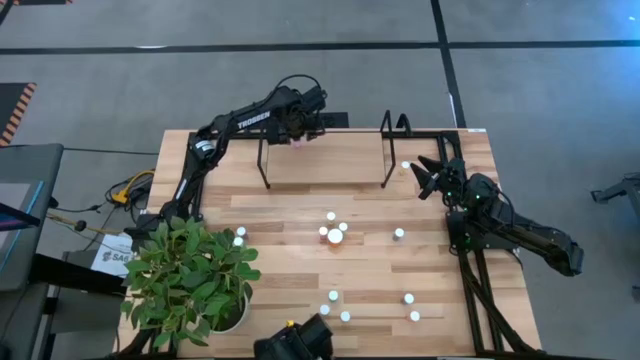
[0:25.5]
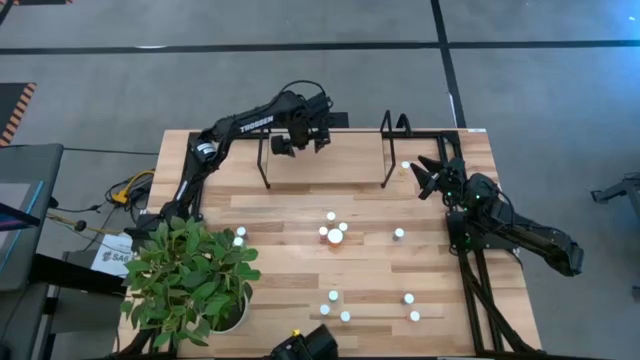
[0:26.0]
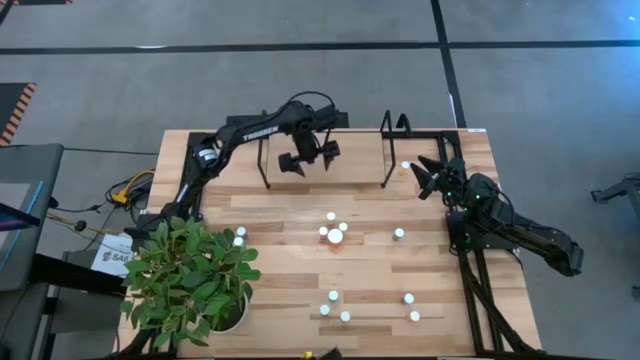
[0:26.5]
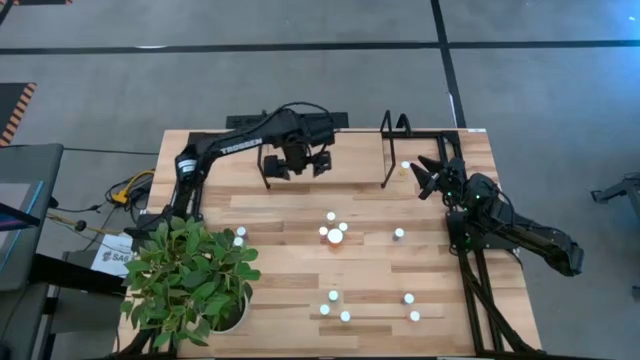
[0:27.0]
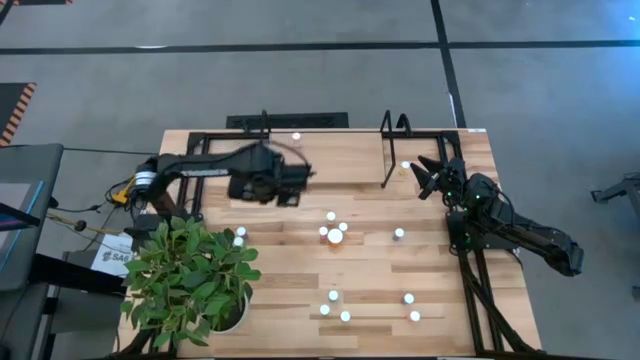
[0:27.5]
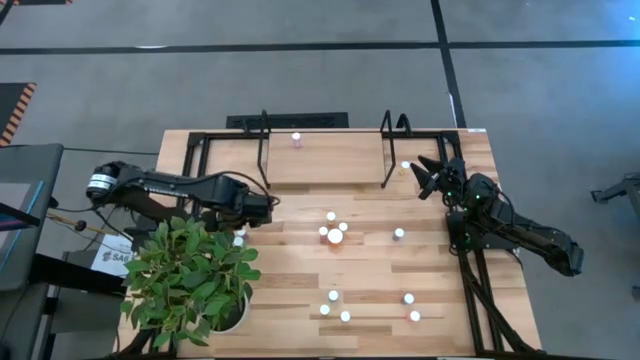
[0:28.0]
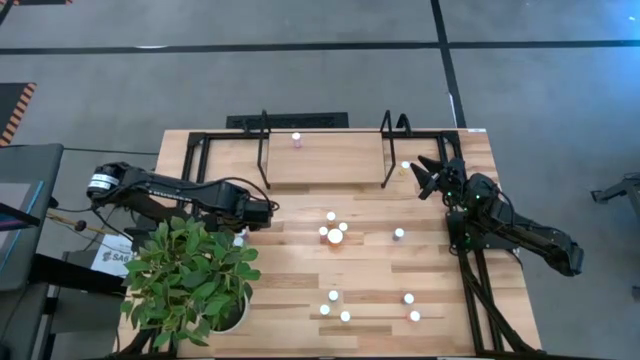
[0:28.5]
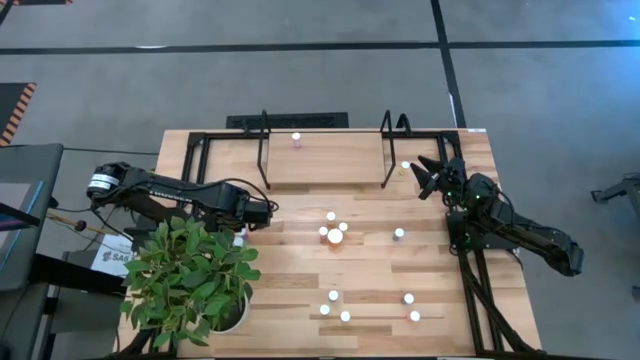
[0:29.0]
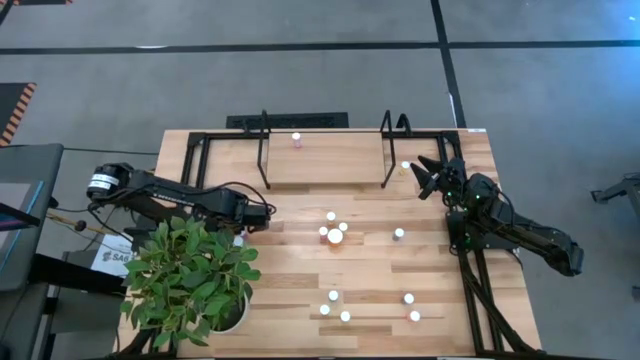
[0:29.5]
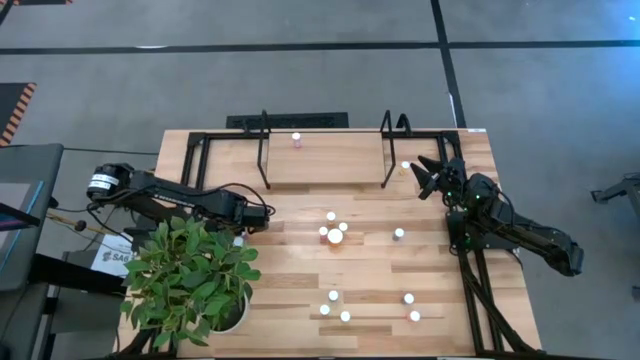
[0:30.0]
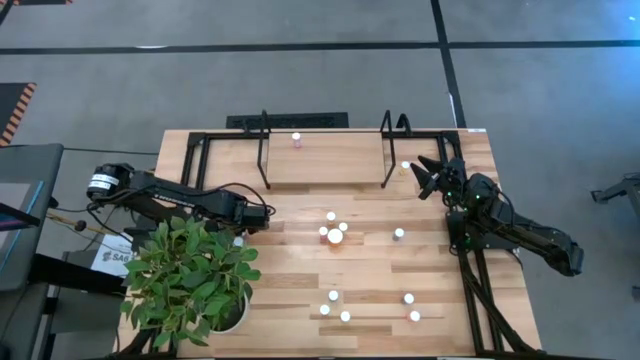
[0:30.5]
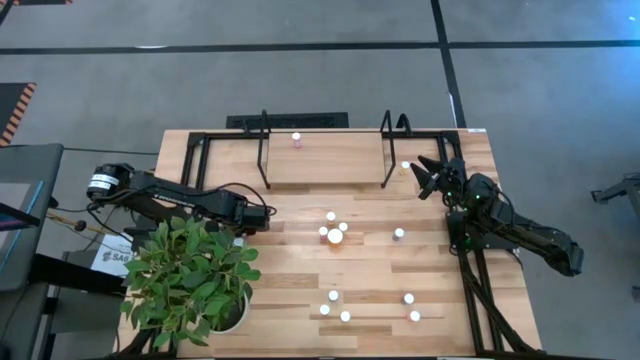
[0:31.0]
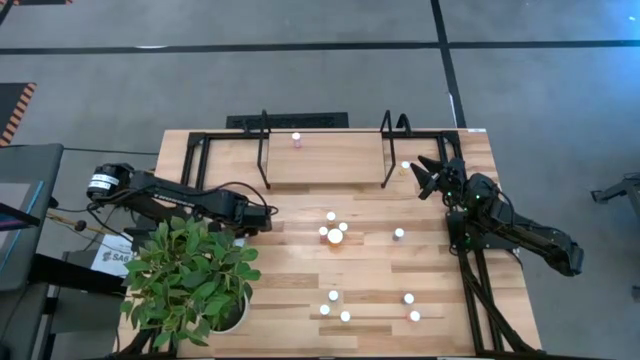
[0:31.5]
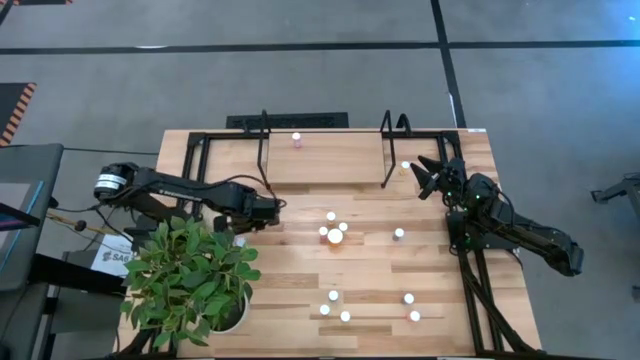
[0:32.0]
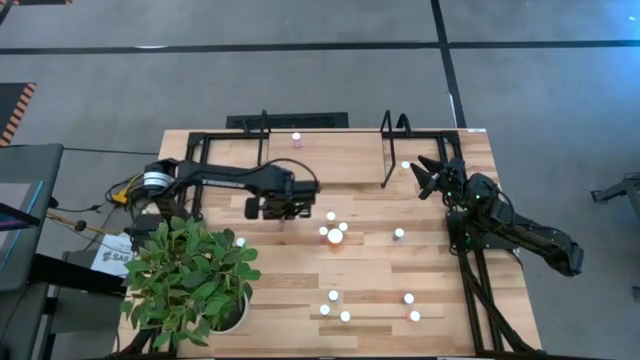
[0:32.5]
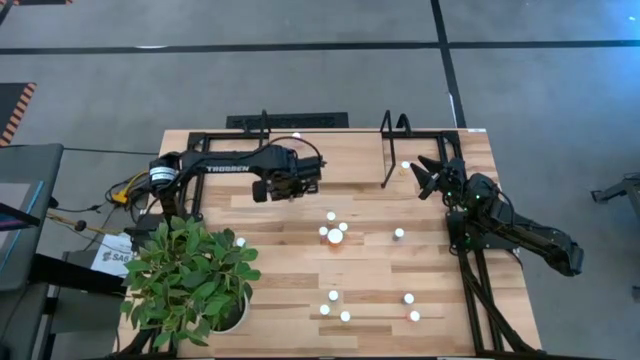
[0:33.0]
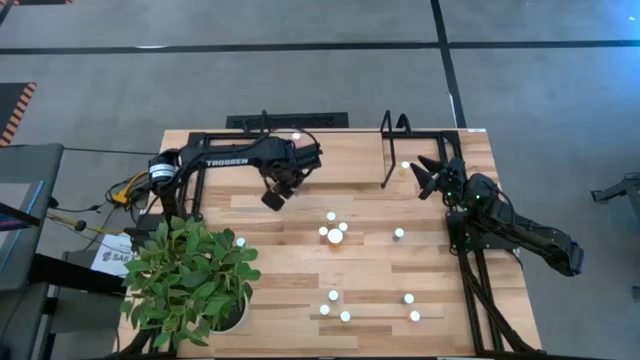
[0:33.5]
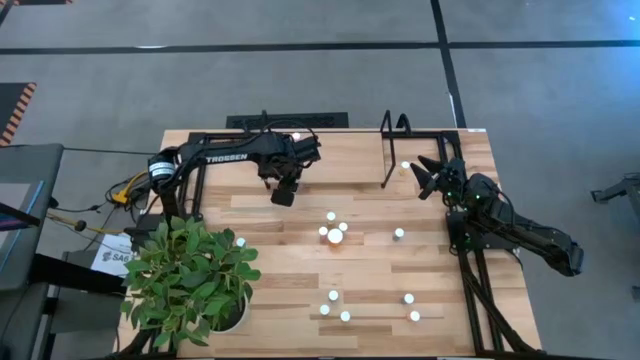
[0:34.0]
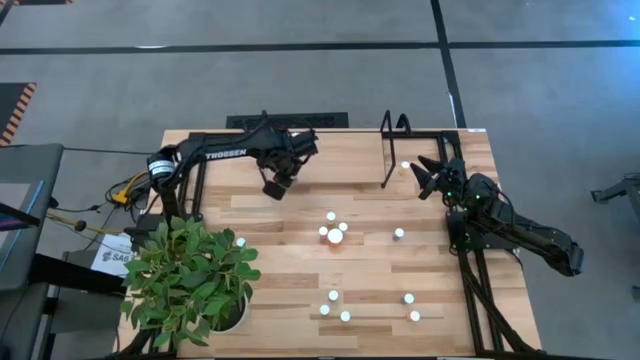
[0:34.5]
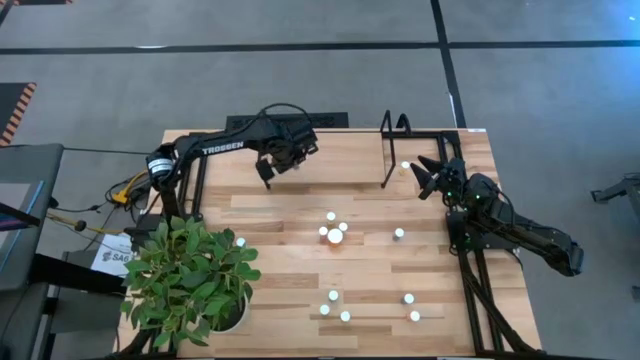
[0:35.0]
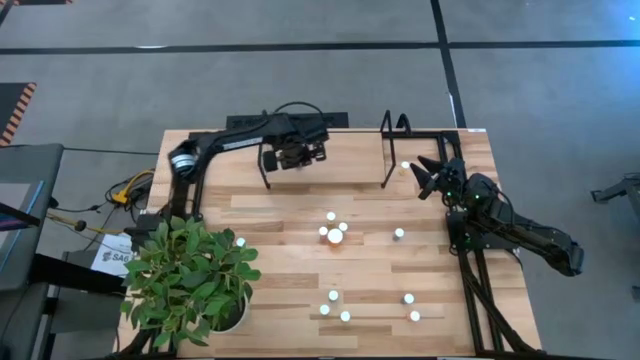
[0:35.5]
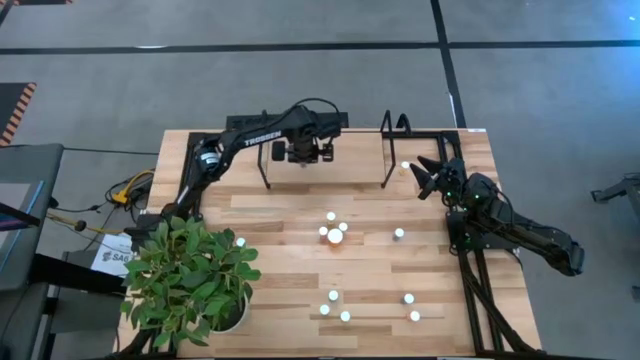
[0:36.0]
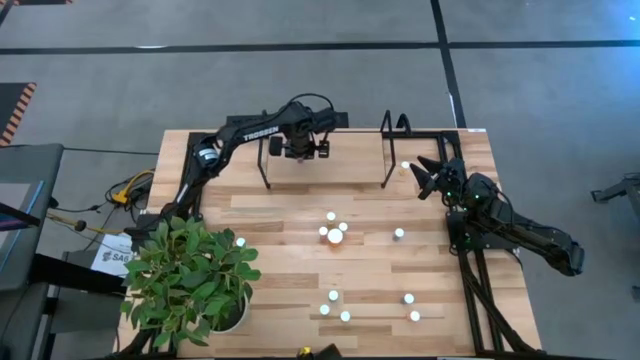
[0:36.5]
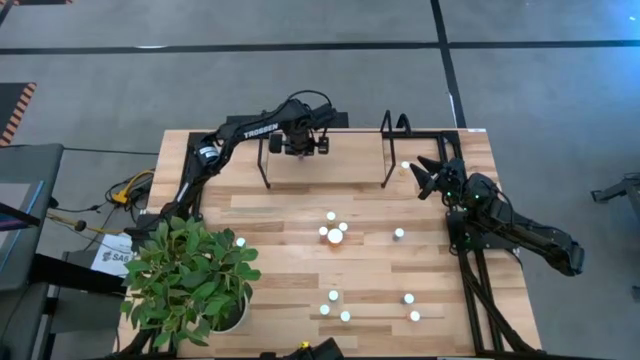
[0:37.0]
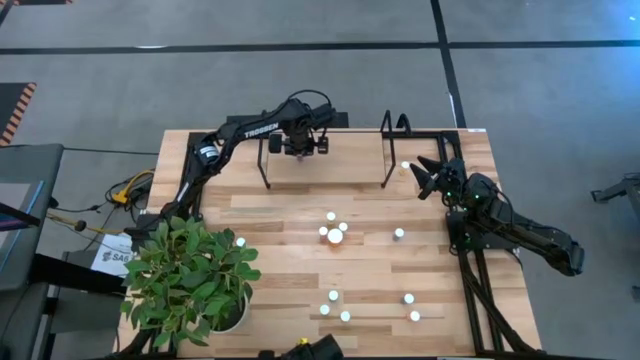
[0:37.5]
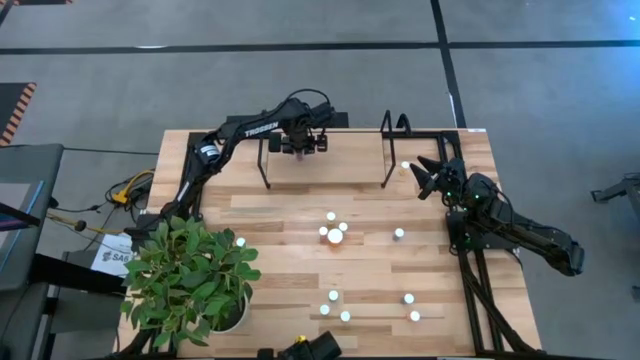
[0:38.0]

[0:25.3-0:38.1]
Task: Pick and place medicine bottles onto shelf by color
Put the blue pill bottle on the shelf

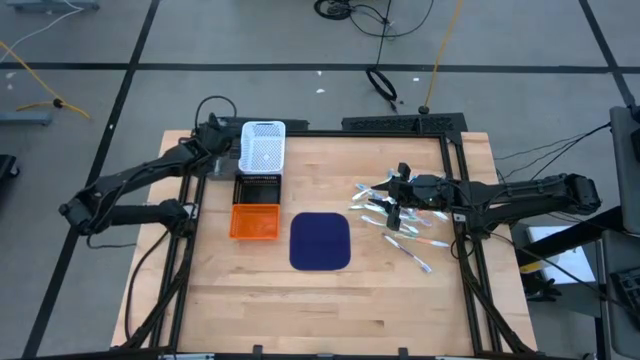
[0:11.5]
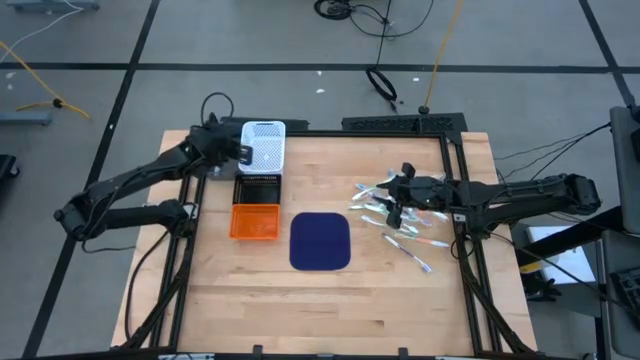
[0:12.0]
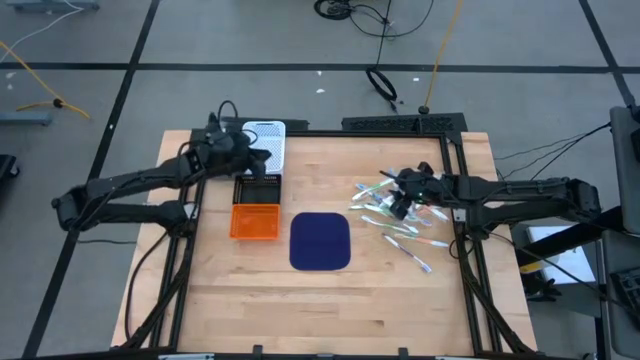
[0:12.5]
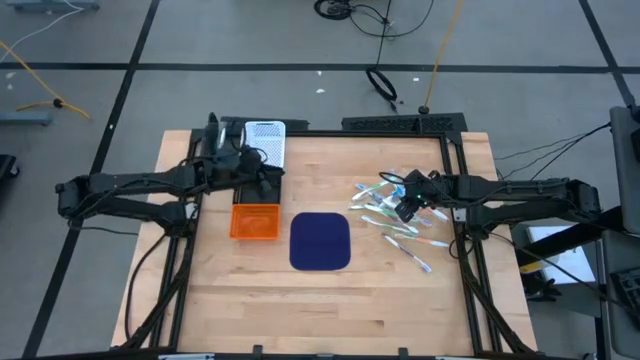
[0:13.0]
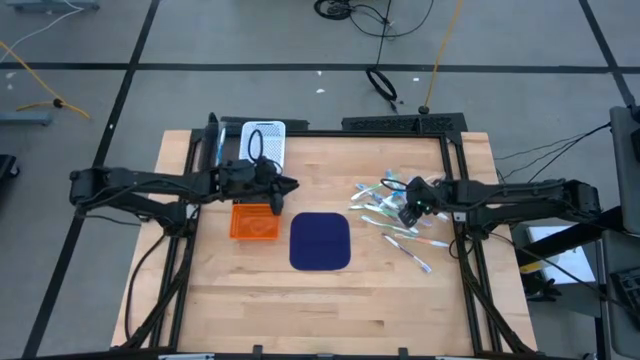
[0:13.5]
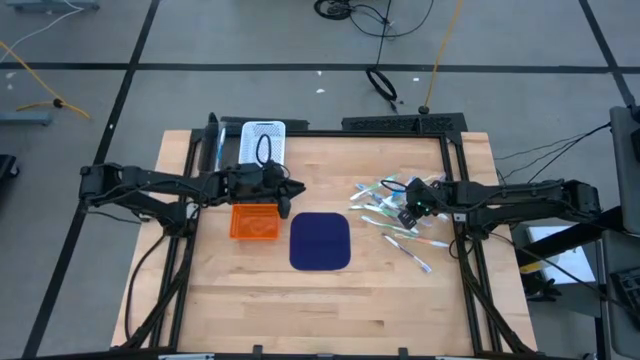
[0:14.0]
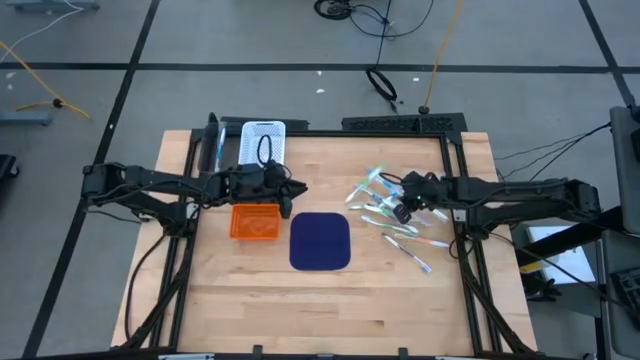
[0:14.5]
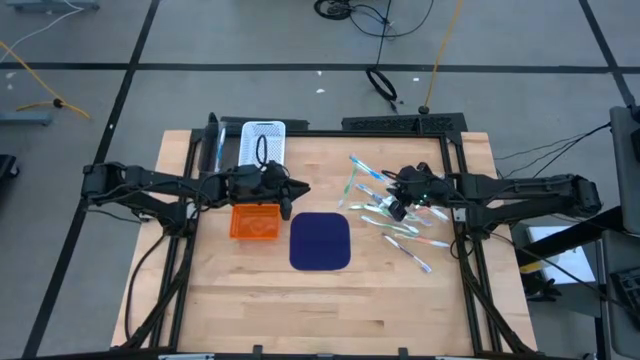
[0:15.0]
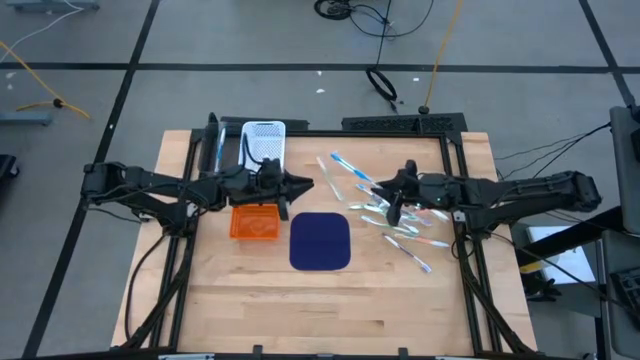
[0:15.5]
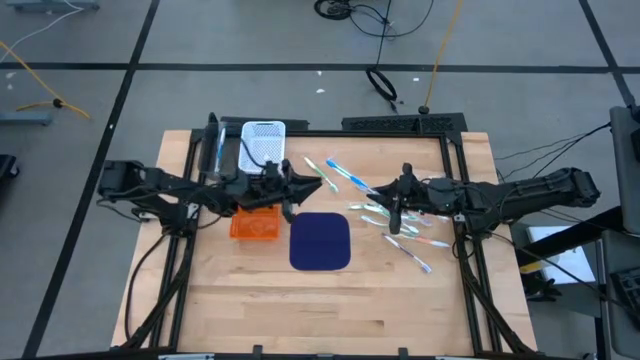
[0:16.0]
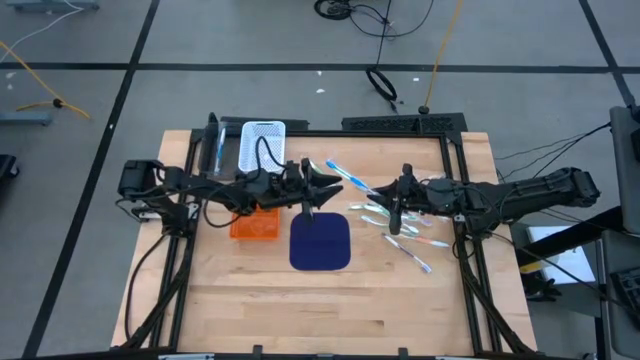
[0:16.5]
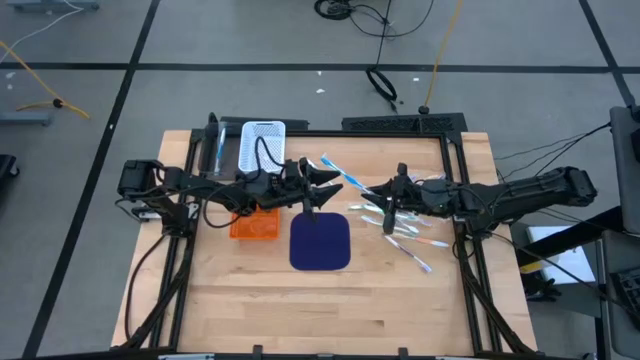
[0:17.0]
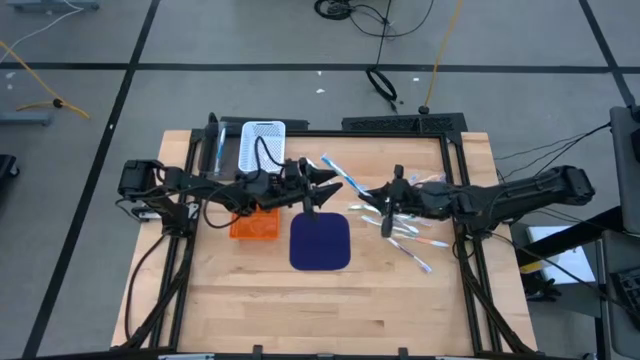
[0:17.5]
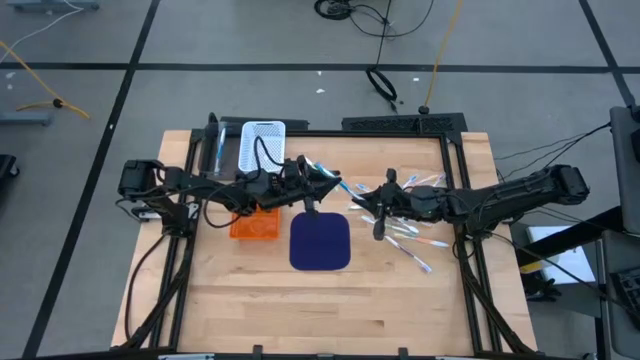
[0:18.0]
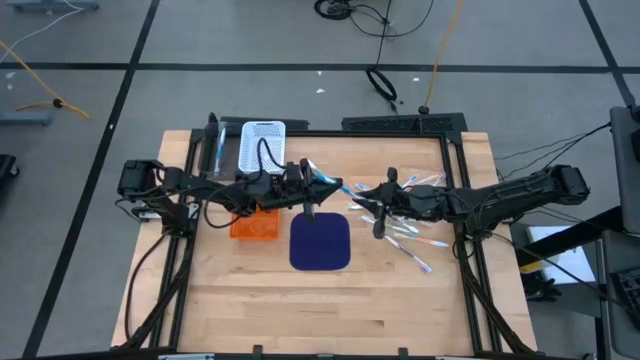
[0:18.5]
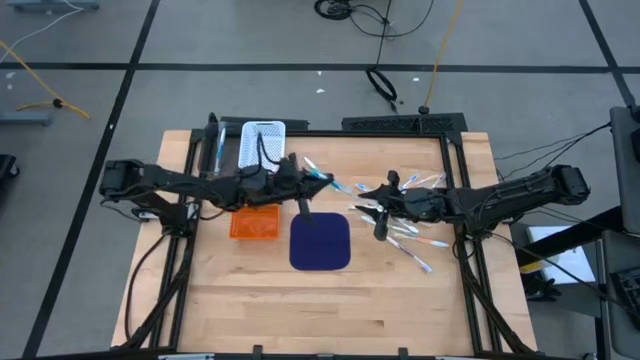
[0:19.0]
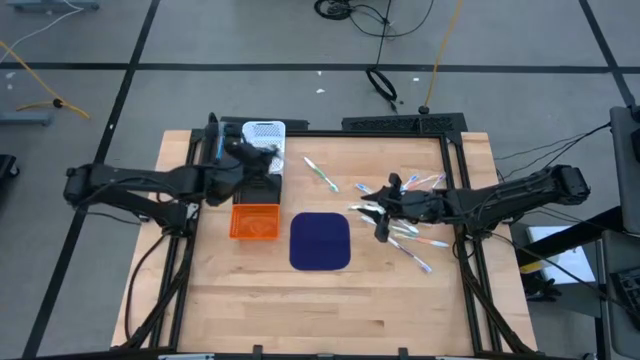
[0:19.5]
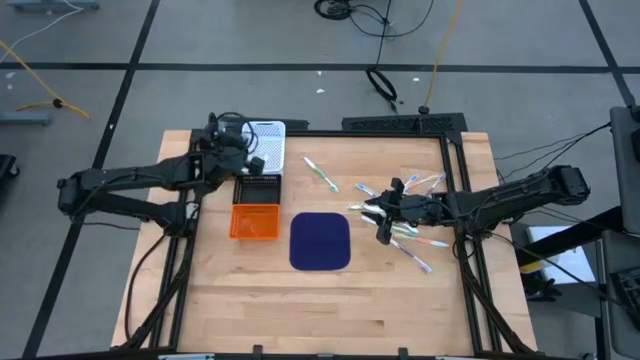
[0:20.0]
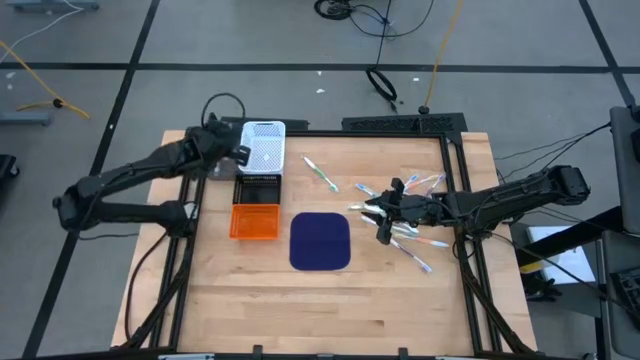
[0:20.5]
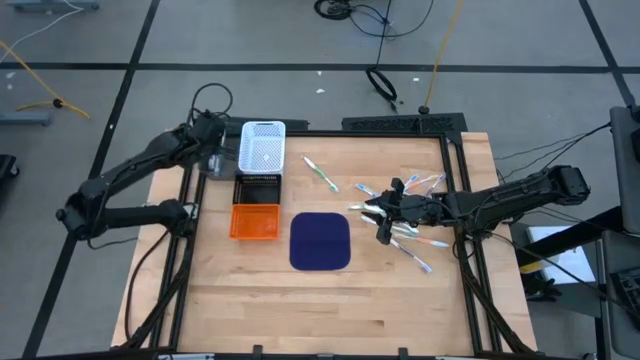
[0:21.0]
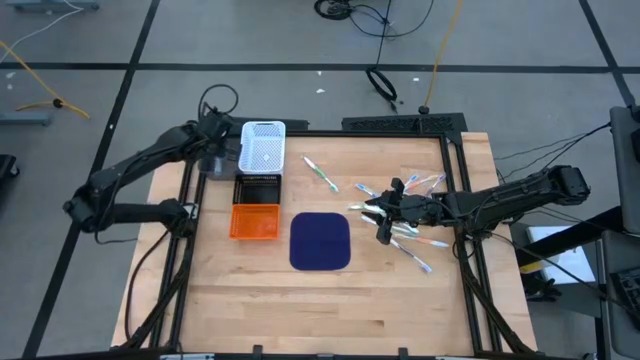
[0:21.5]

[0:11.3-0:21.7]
Task: Pick & Place Toothbrushes
Put the blue toothbrush into the gray bin
